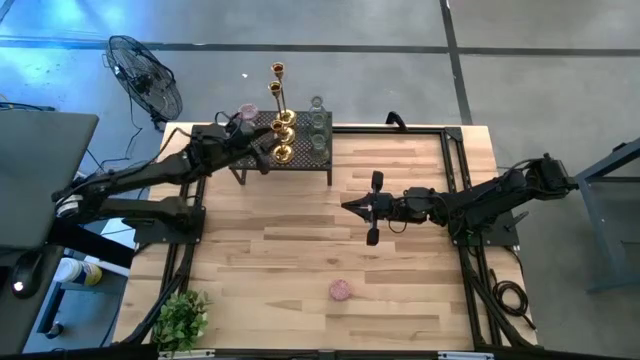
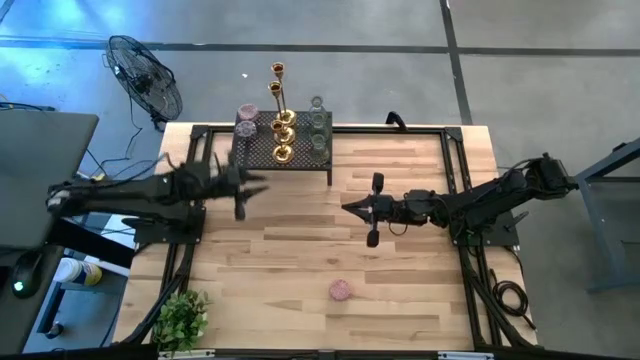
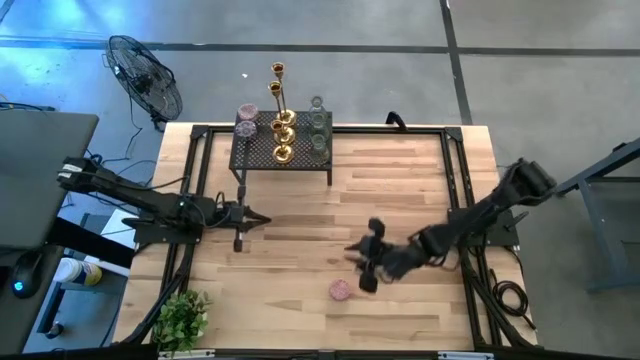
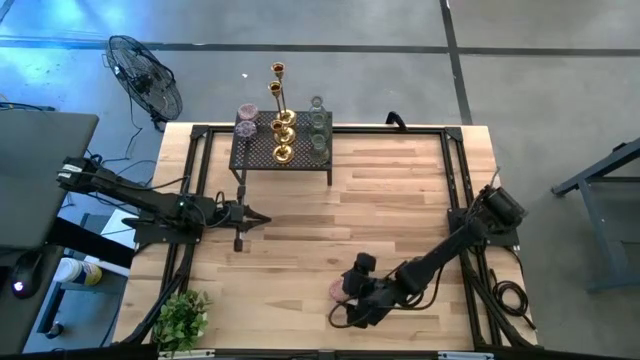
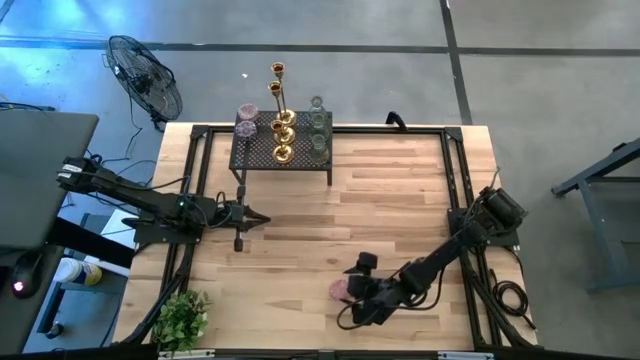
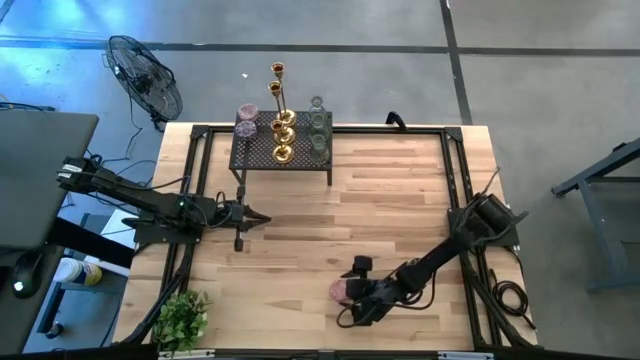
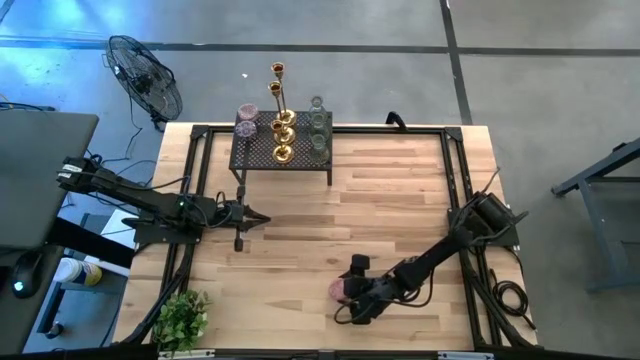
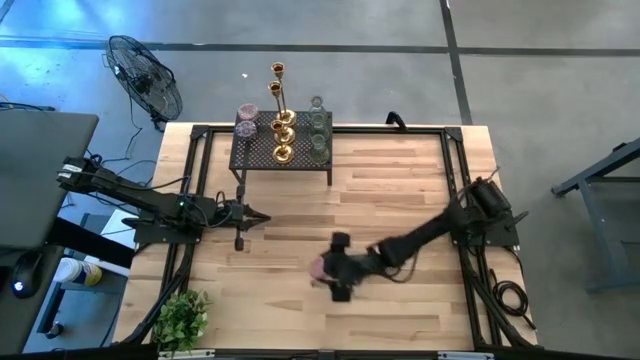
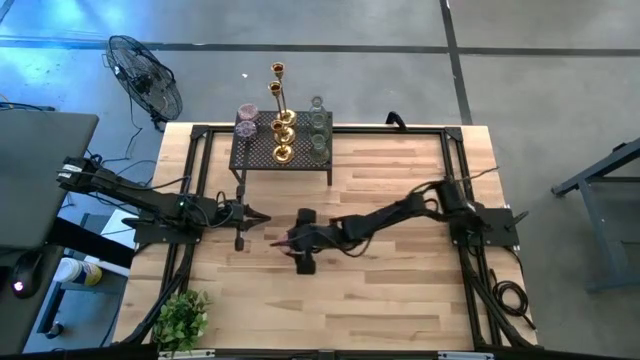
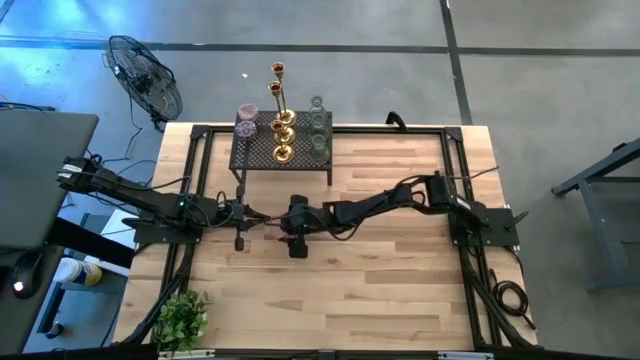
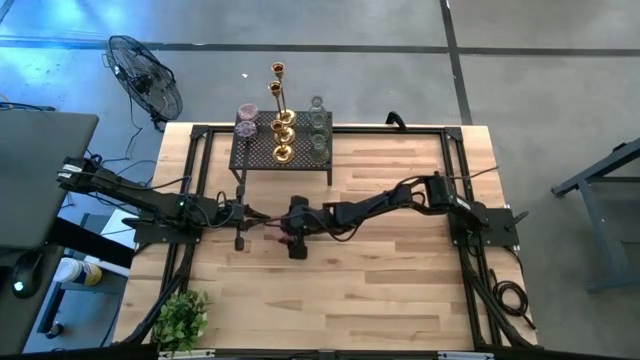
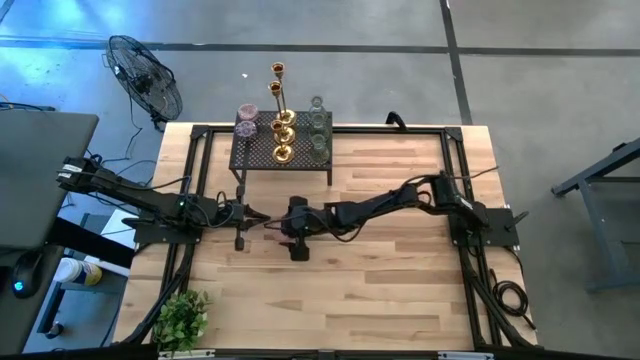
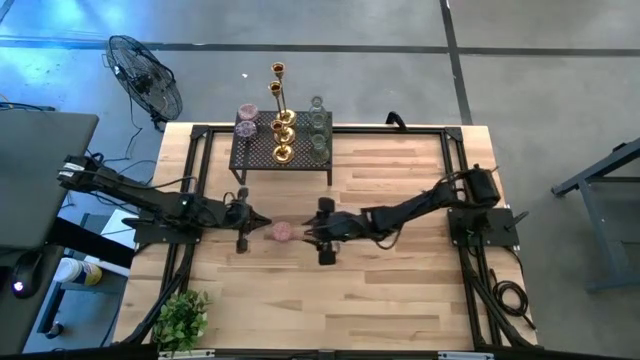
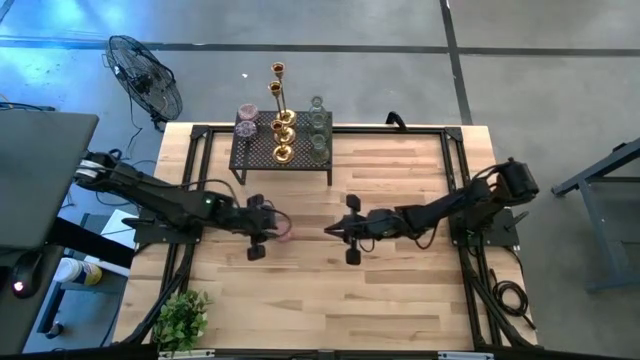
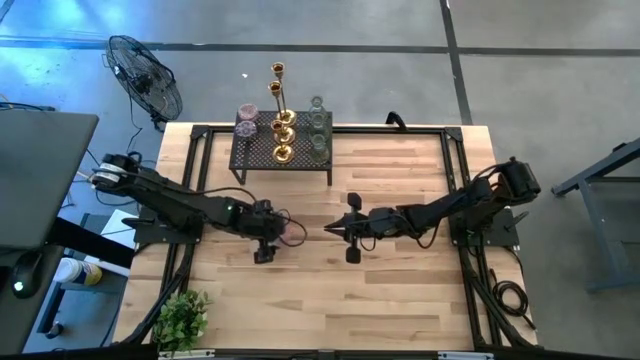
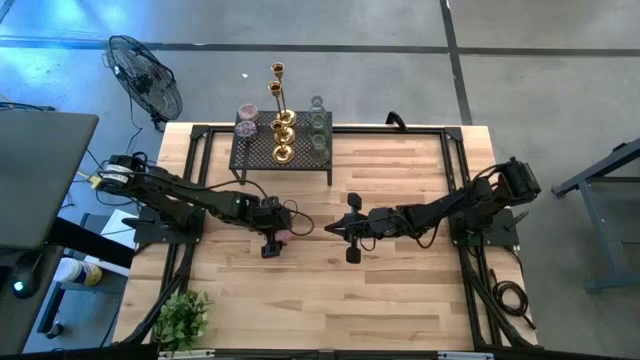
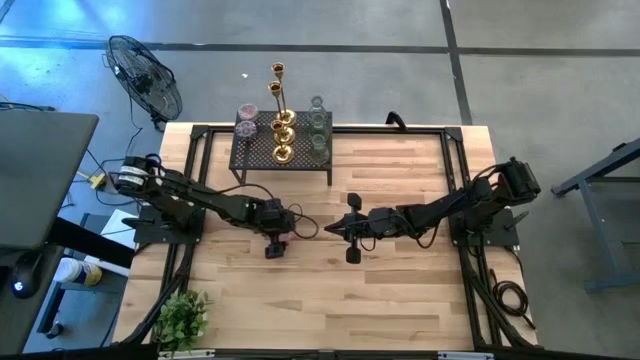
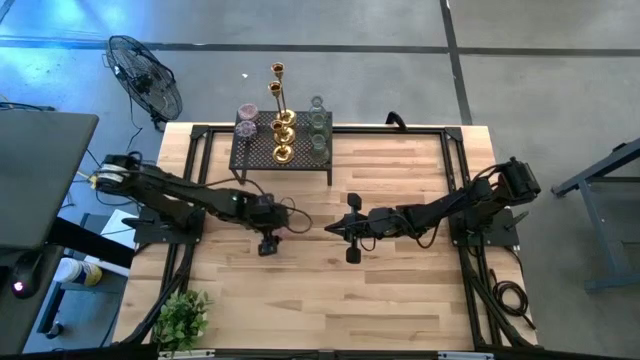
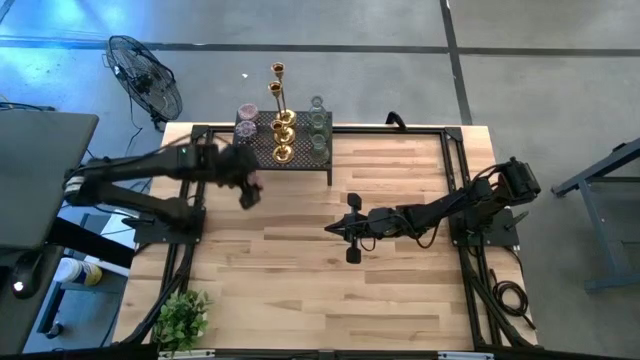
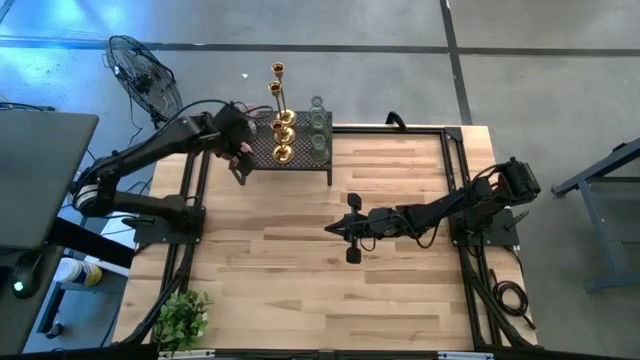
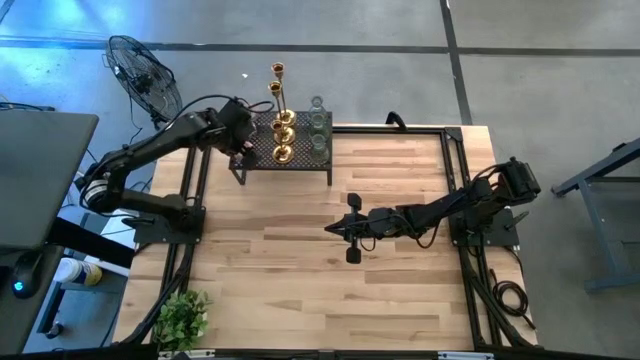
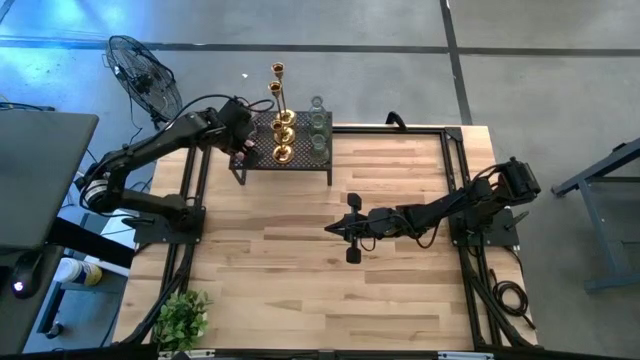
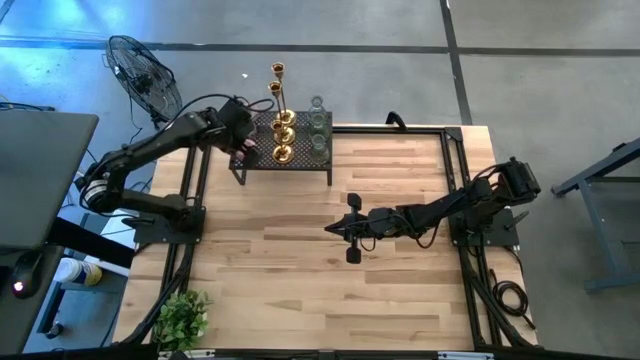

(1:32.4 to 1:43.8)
Task: Pick & Place candle stick holders
Put the pink scented candle on the shelf

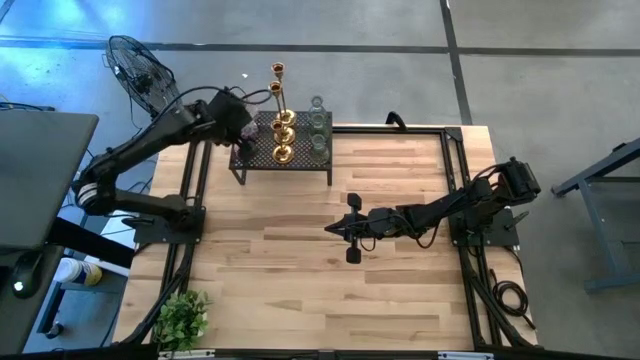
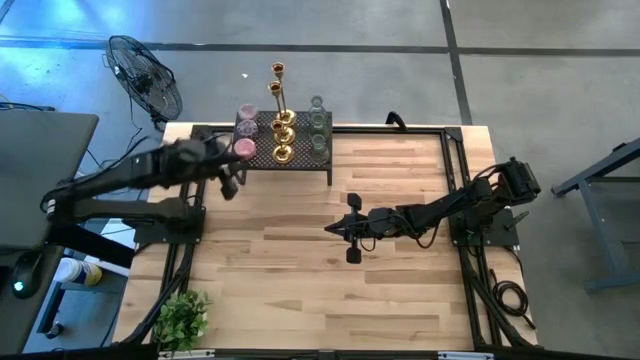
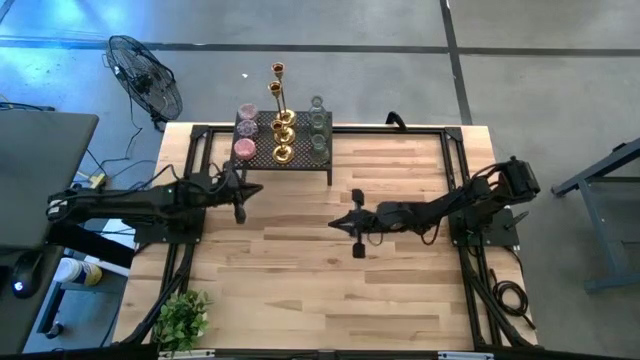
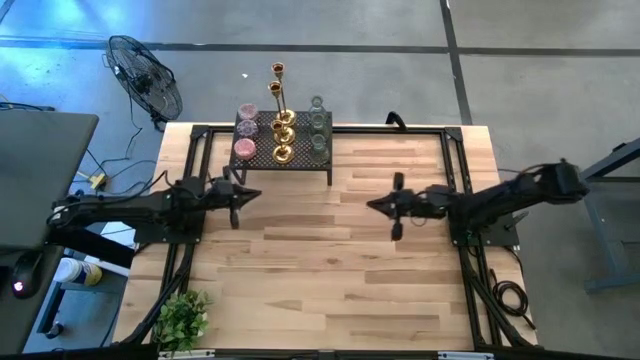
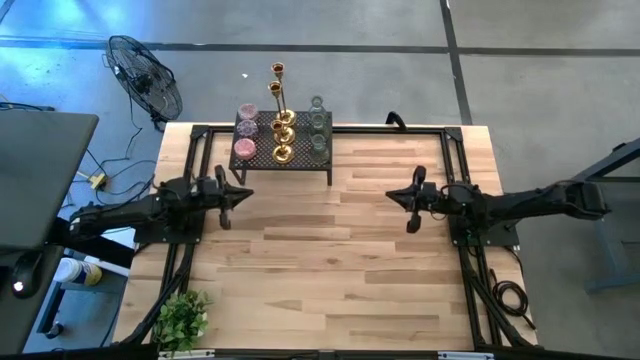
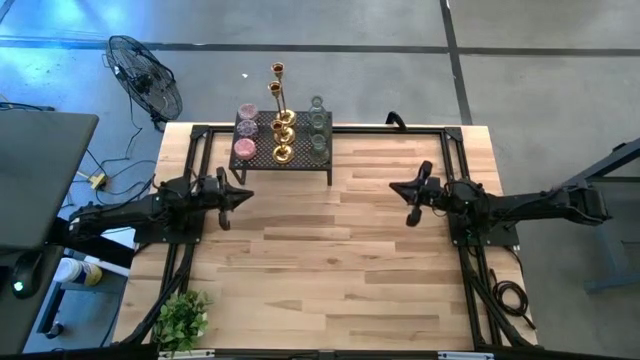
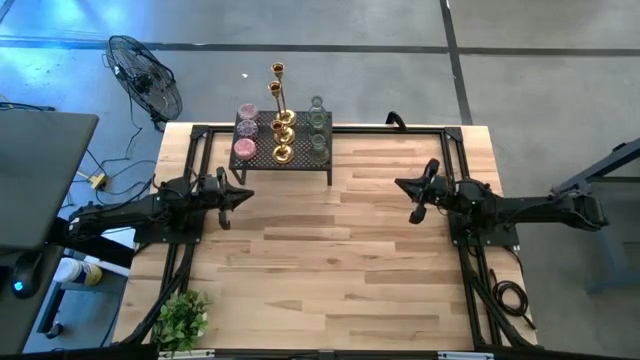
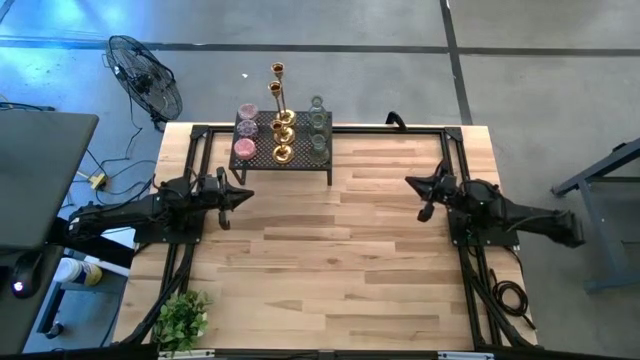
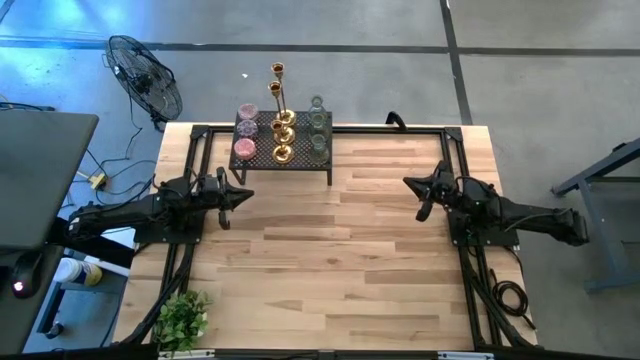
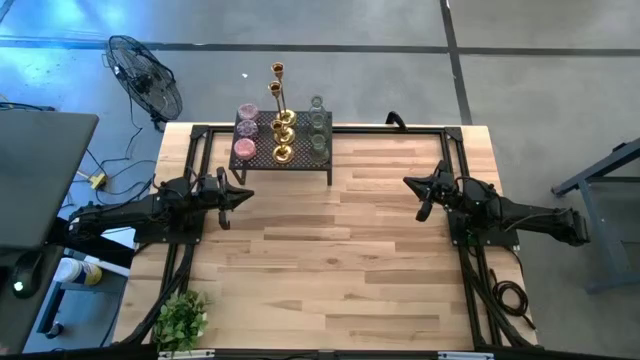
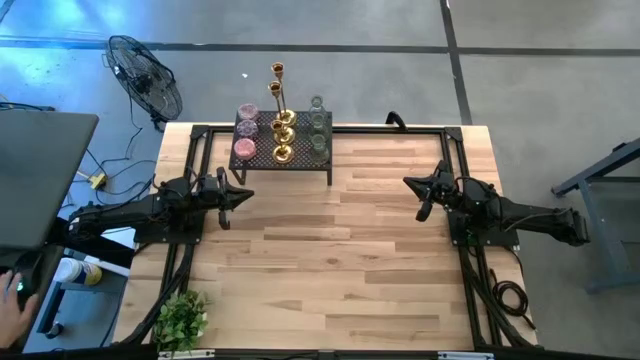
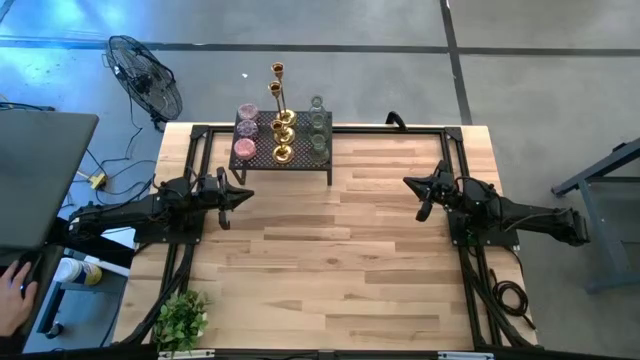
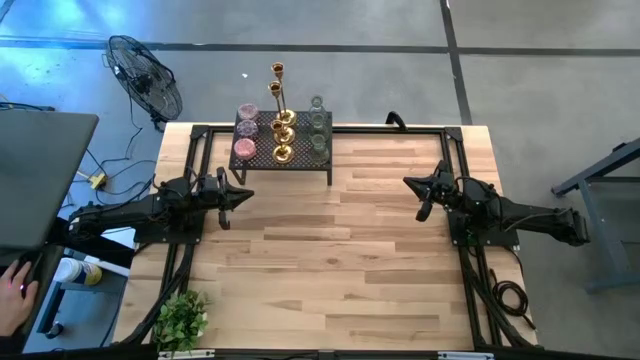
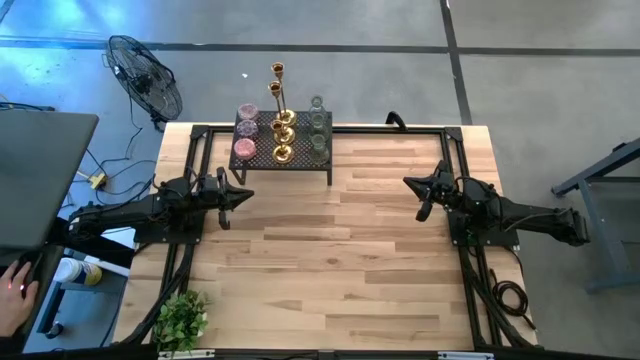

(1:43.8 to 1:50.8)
Return to Home Position

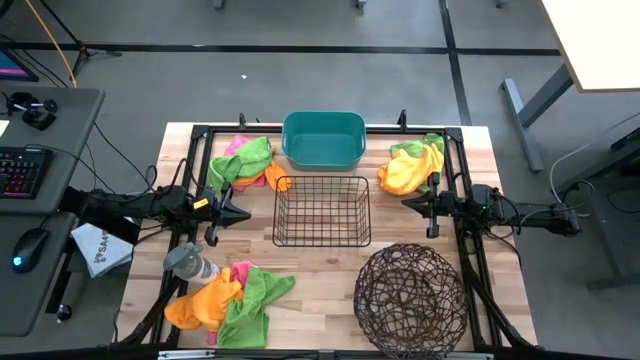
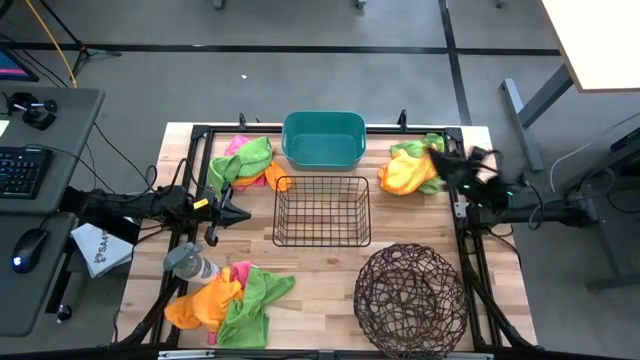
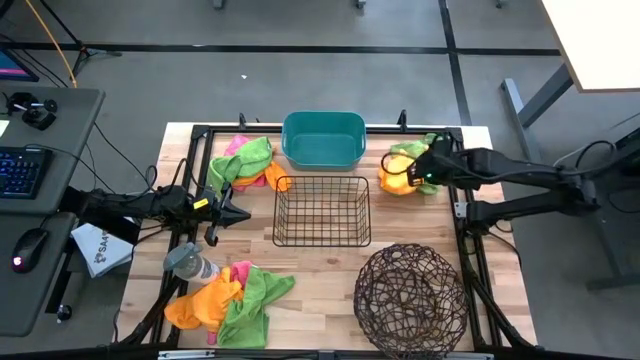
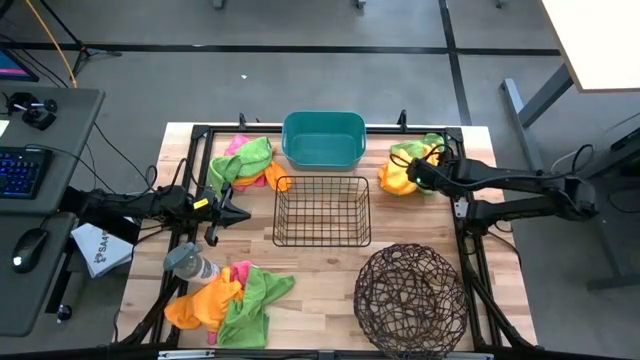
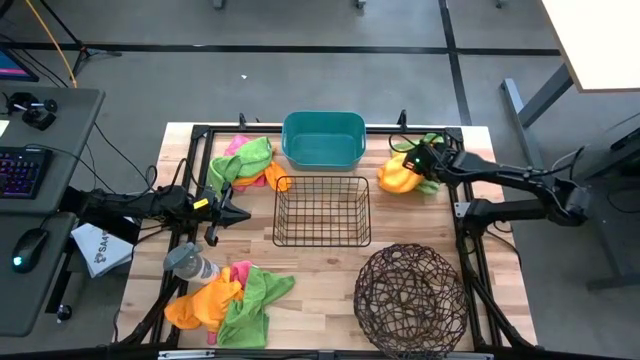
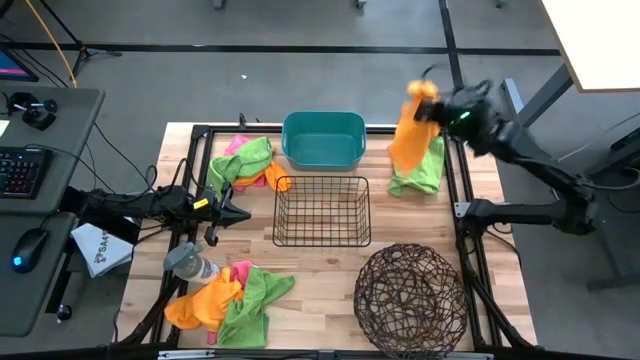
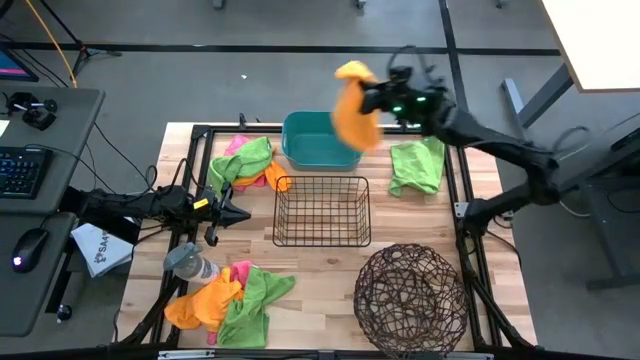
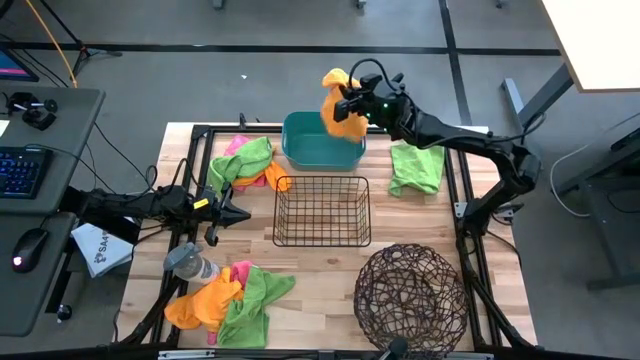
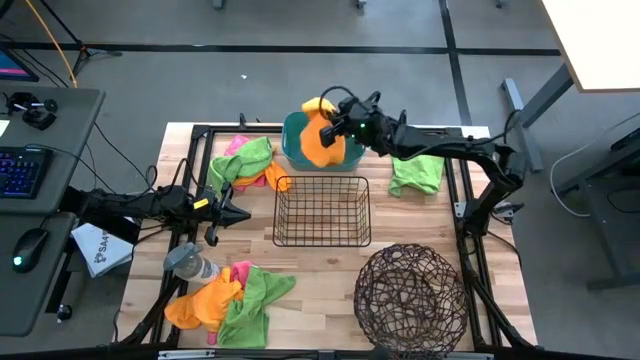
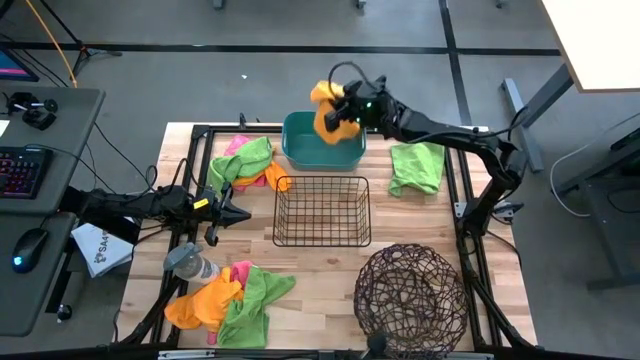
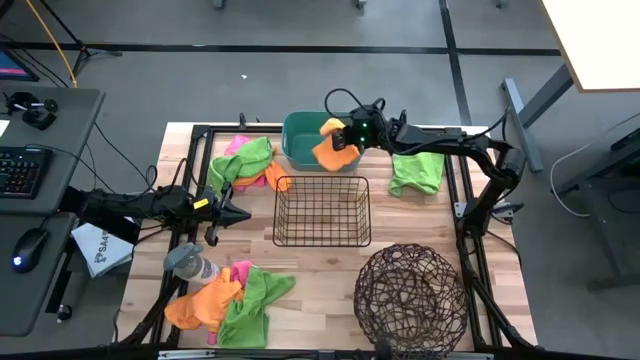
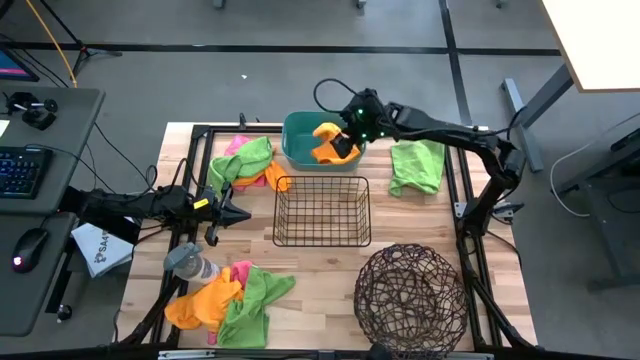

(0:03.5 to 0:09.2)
Task: Sort microfiber towel by color & place in baskets
Put the top right orange microfiber cloth into the blue and green bin
